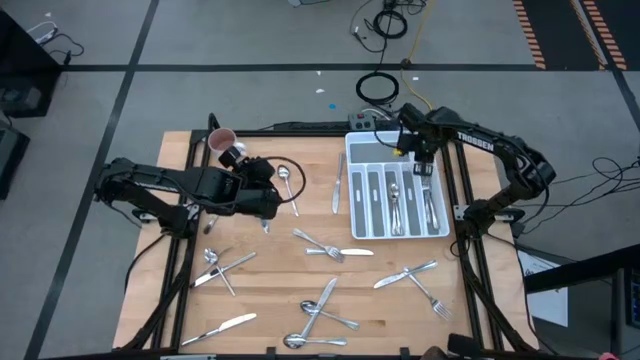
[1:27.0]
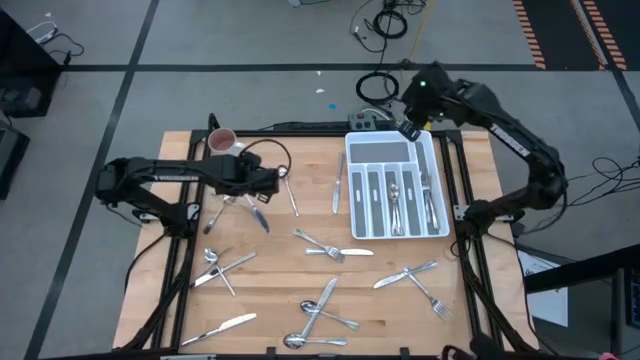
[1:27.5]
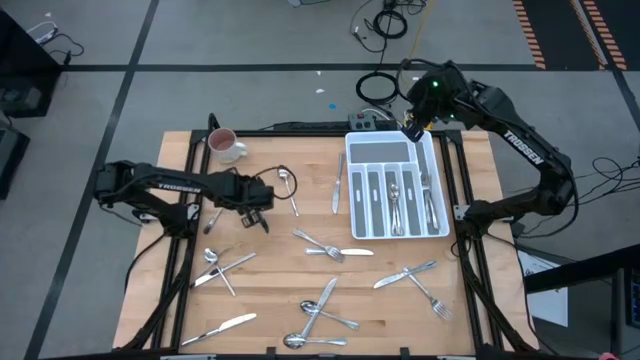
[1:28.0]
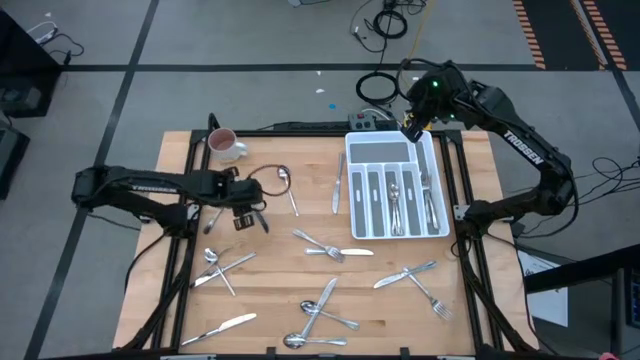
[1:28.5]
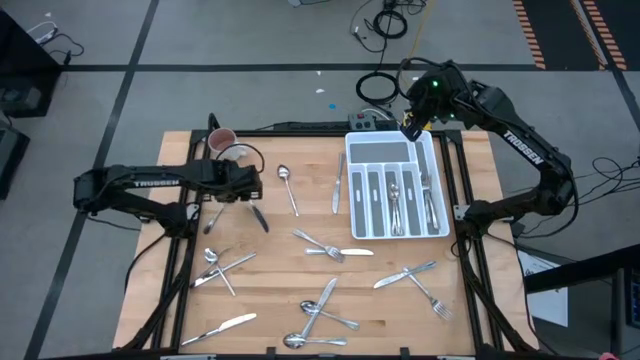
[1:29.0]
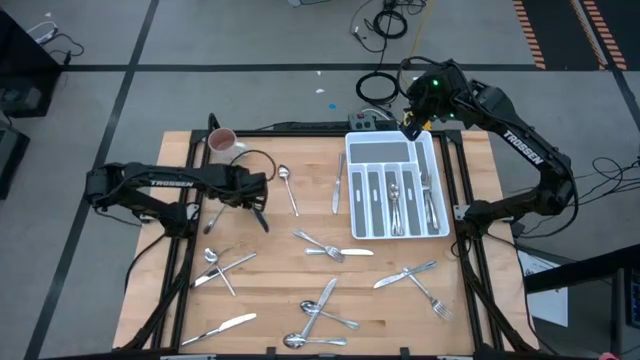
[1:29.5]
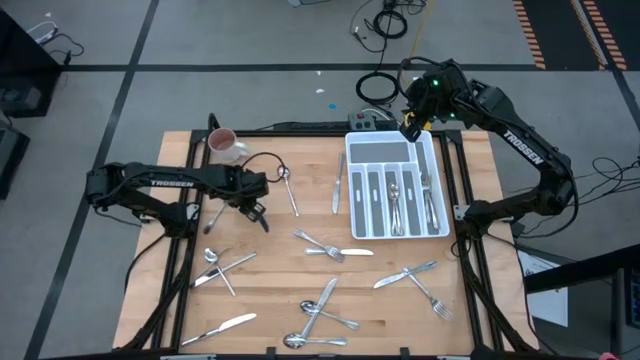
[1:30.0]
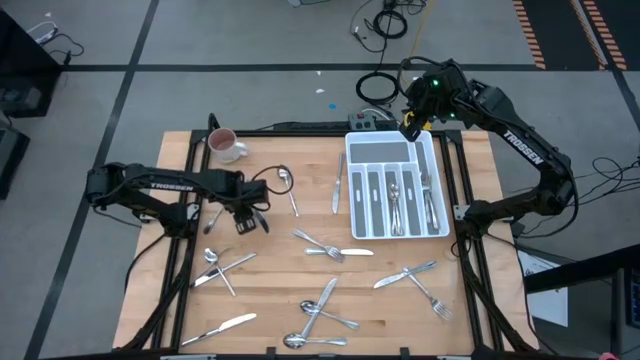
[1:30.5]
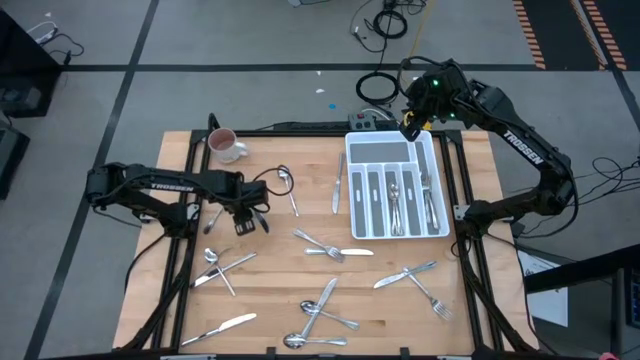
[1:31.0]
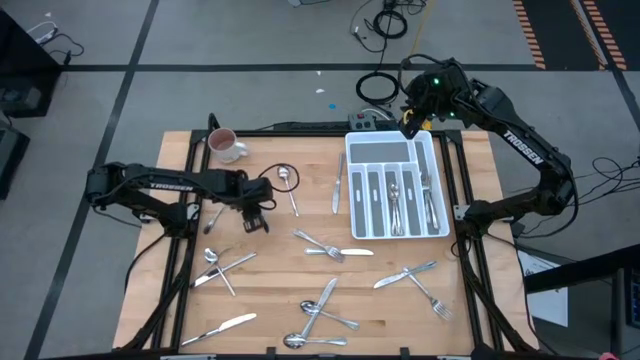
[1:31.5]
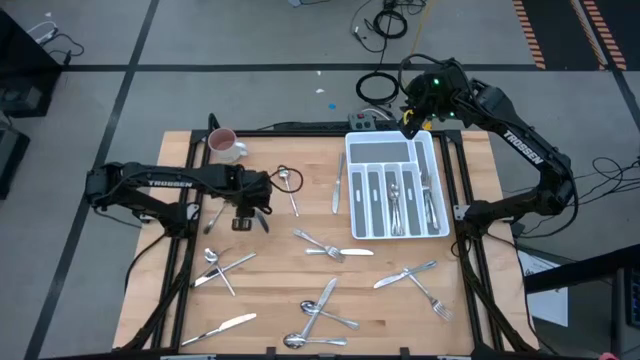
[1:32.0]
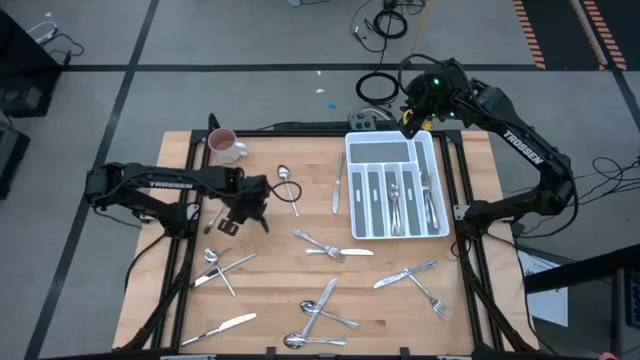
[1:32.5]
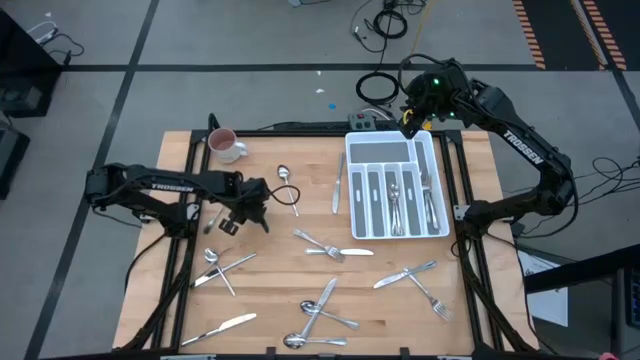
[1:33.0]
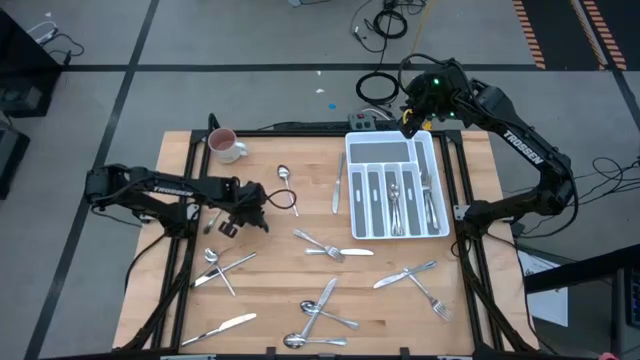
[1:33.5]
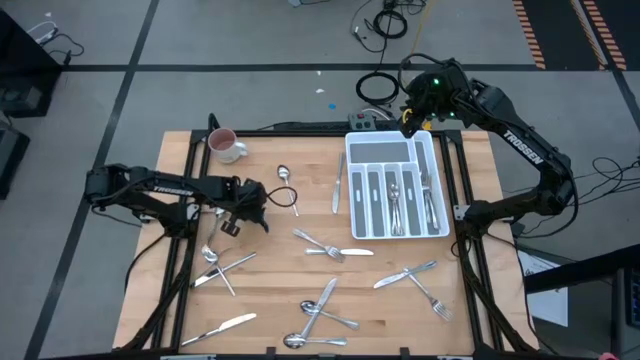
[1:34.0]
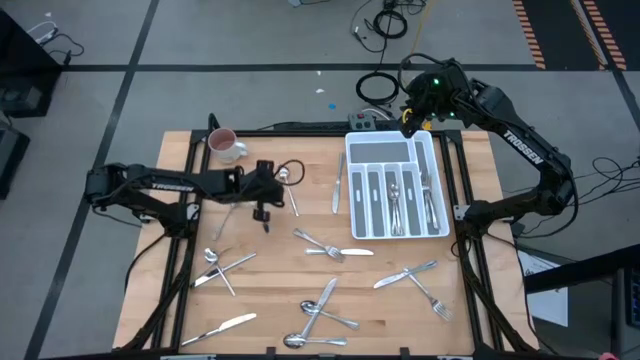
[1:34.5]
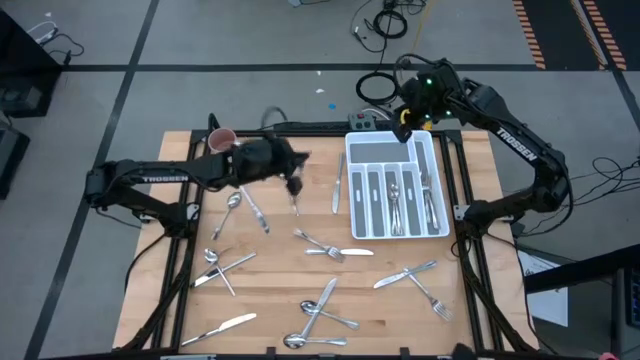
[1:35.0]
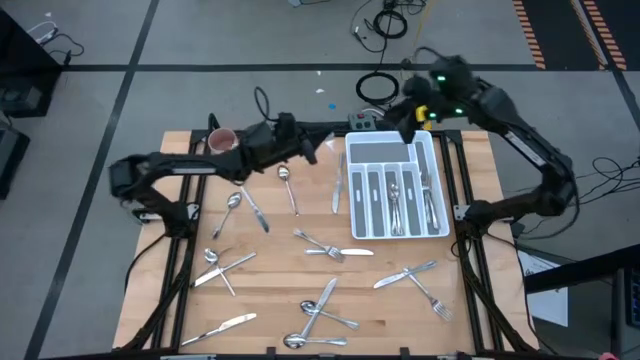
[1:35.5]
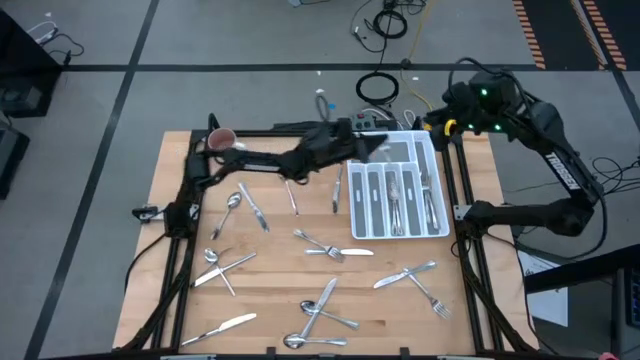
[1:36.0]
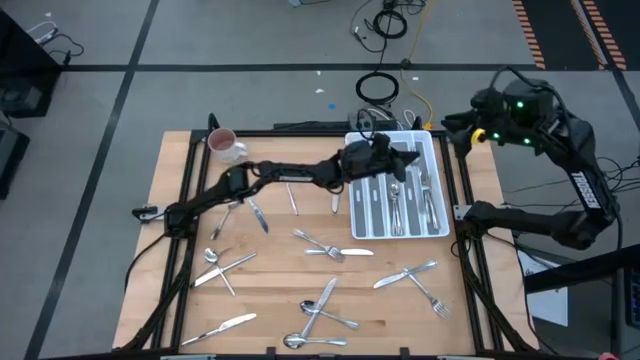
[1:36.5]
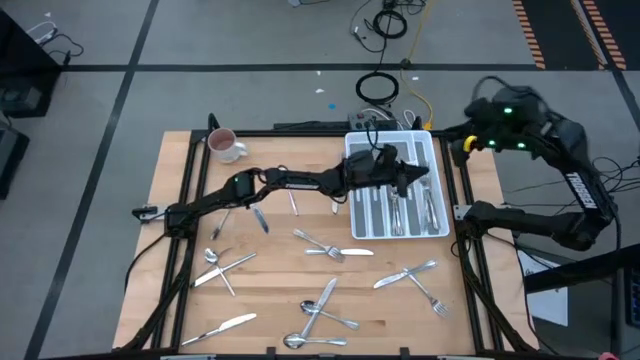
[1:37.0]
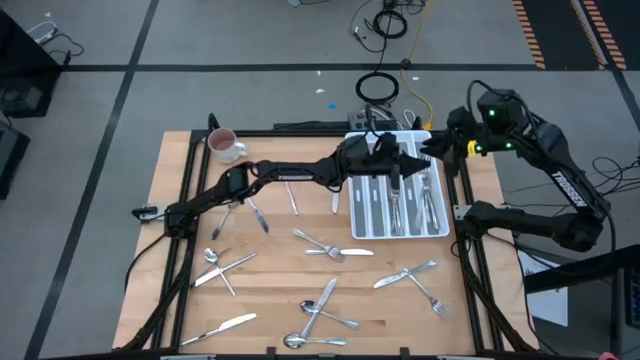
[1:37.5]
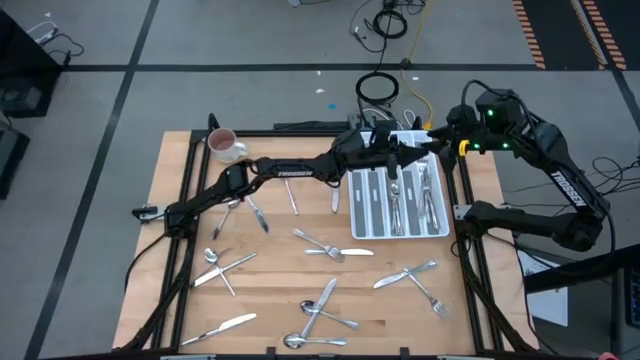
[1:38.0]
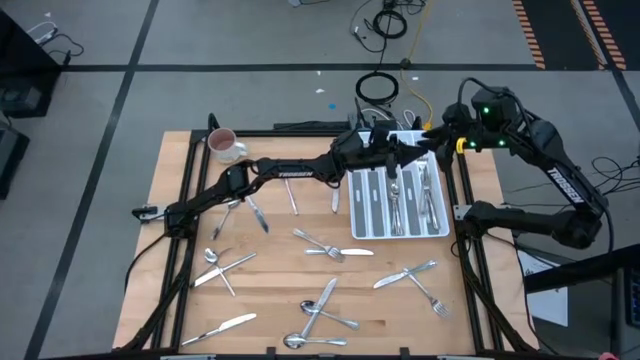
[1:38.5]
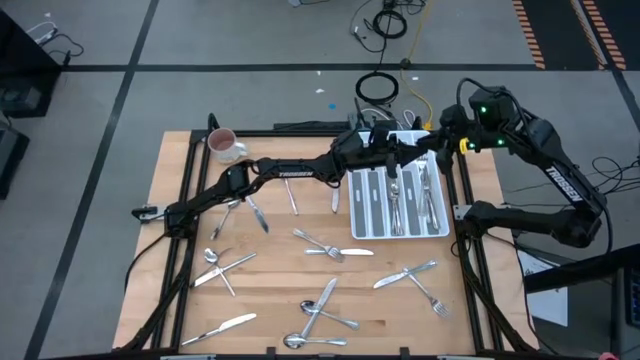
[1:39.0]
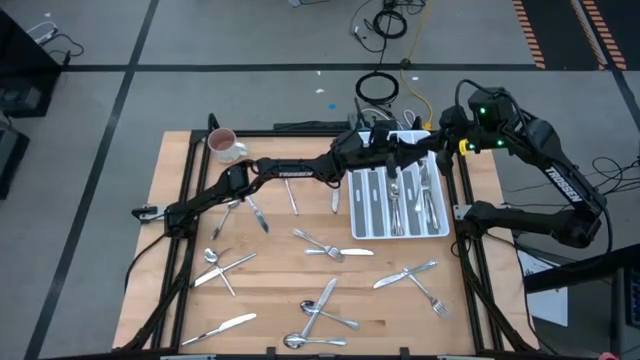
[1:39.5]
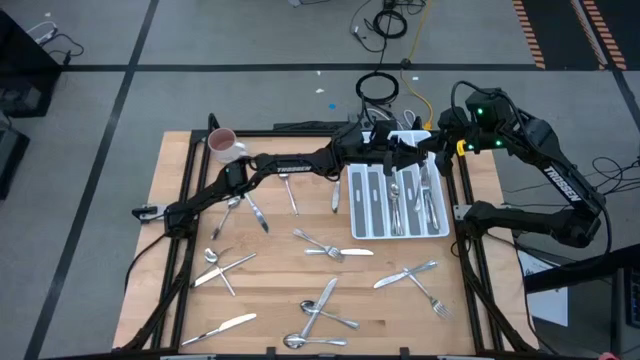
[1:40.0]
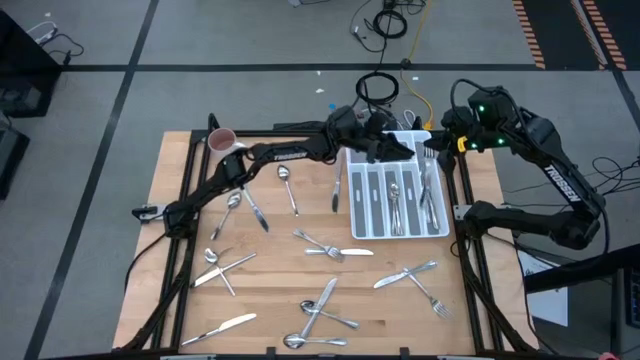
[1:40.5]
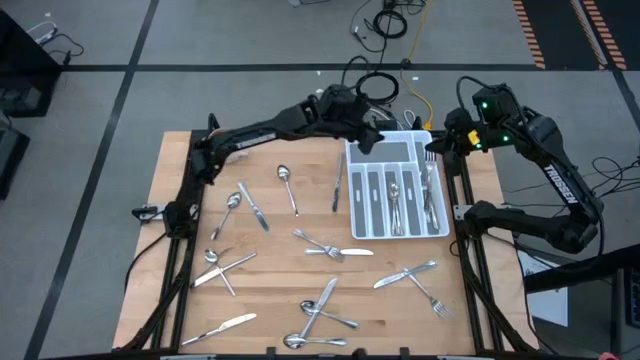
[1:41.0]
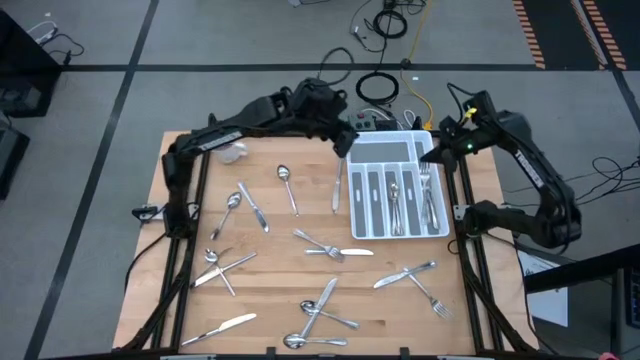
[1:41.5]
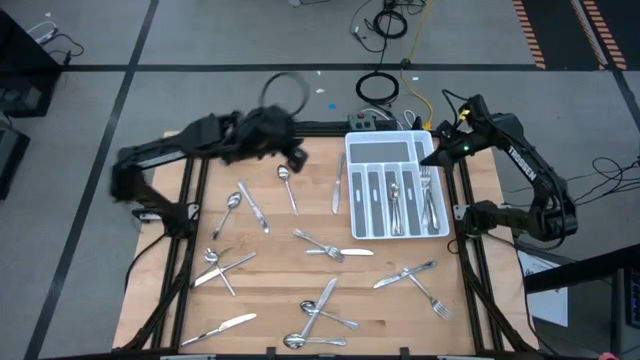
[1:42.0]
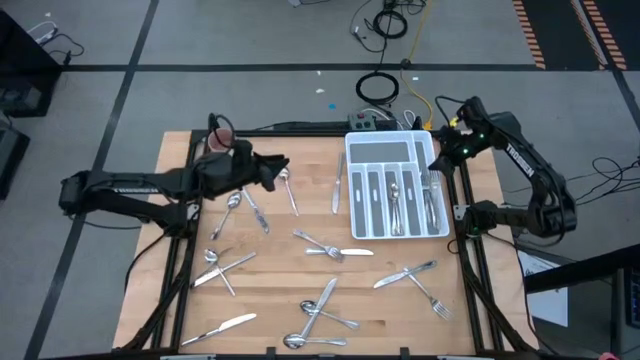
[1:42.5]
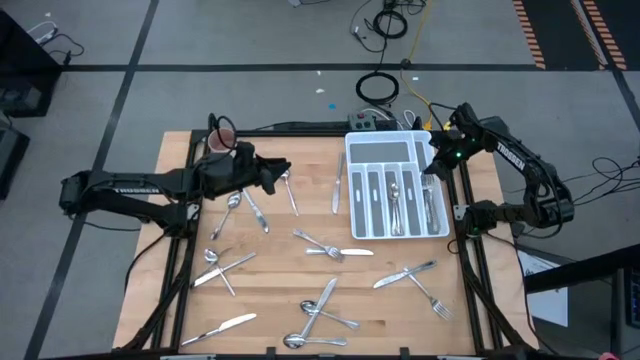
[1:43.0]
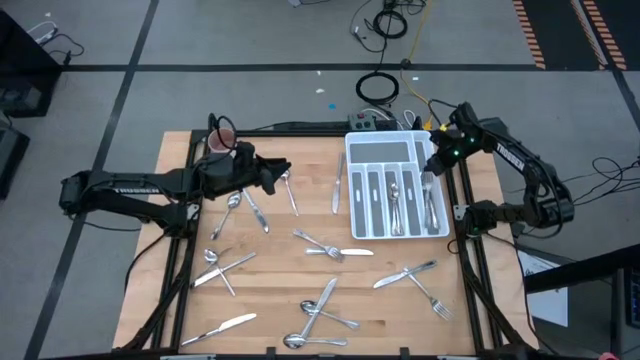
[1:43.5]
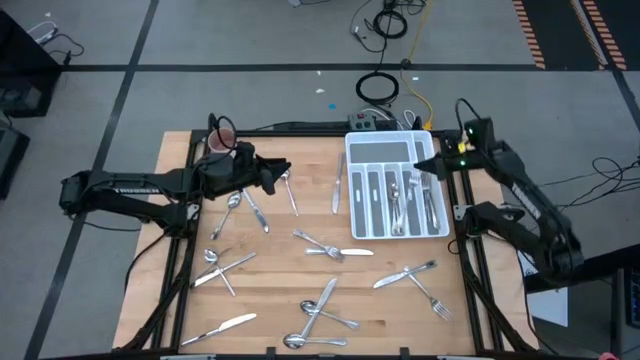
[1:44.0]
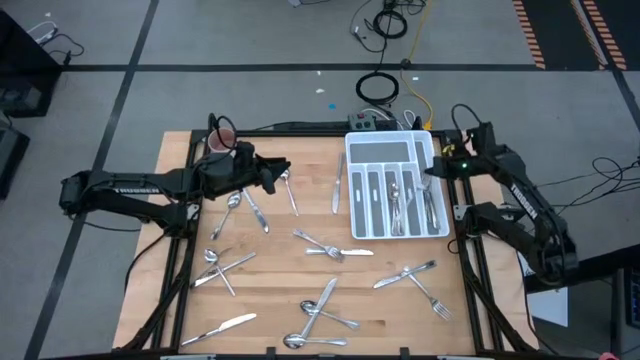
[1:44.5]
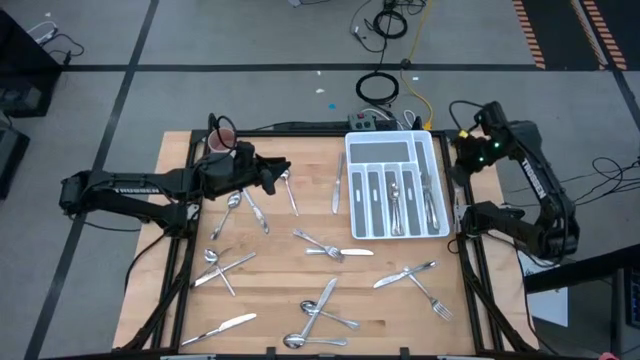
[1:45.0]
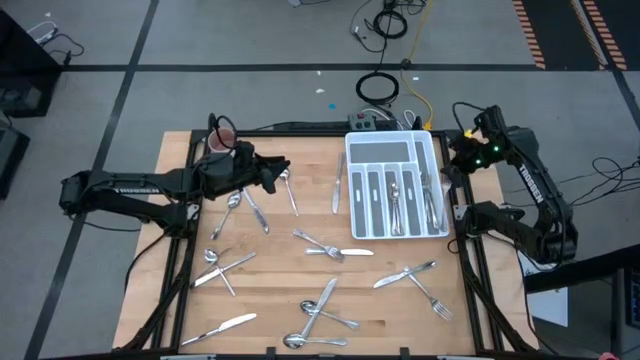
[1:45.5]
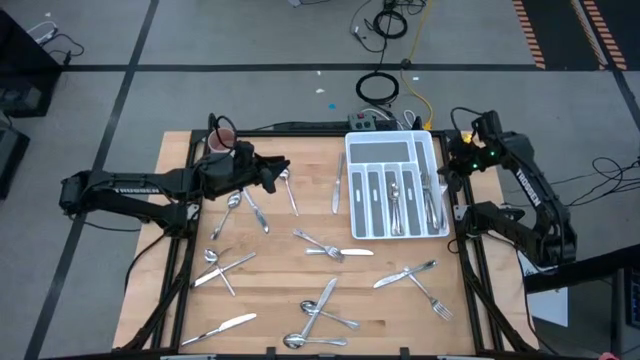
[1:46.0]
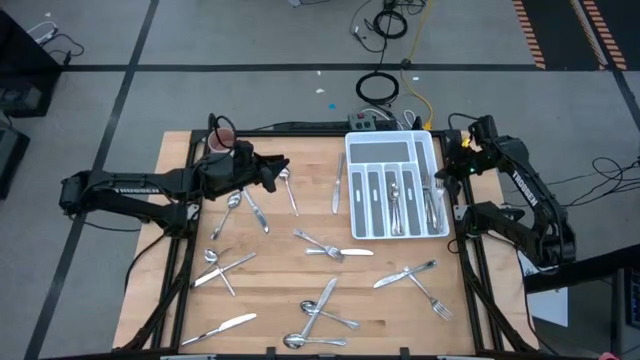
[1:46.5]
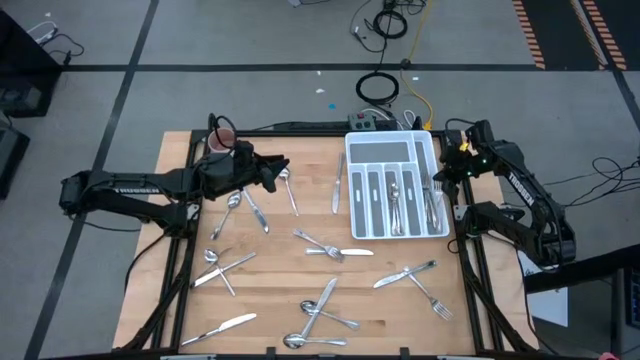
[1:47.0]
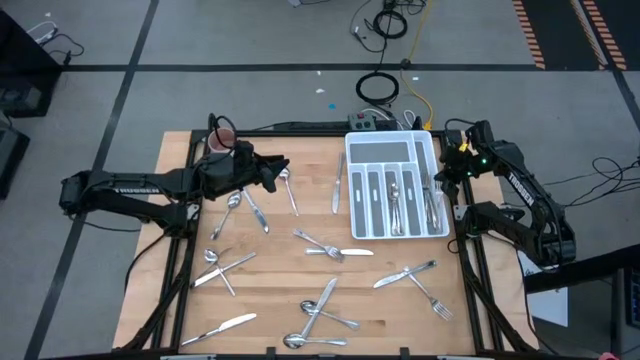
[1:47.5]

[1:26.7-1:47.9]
Task: Sort silverware
Put the fork in the right section of the silverware tray
